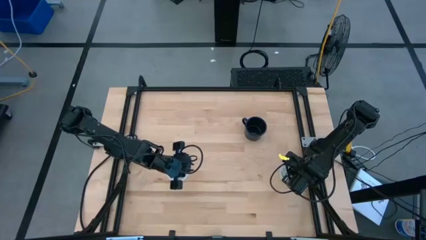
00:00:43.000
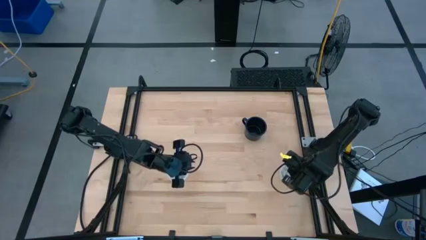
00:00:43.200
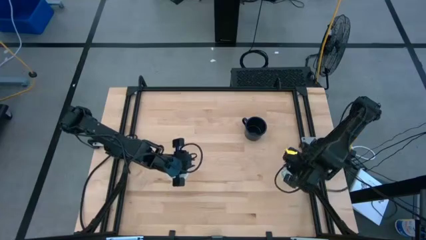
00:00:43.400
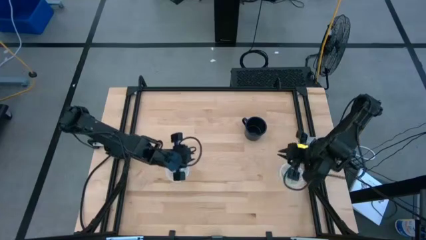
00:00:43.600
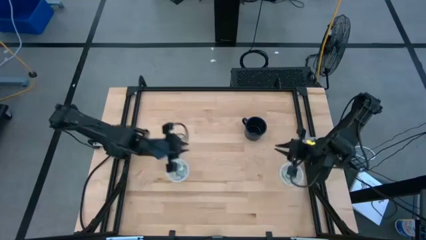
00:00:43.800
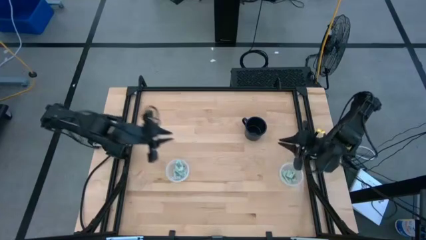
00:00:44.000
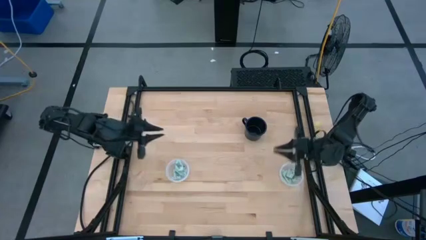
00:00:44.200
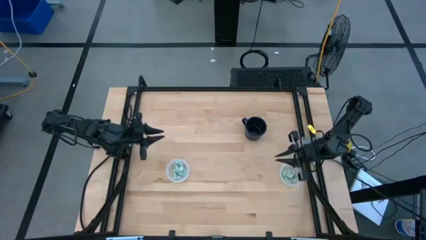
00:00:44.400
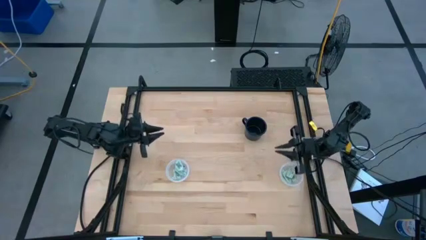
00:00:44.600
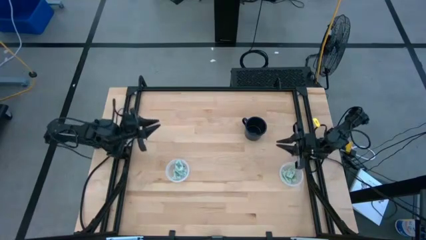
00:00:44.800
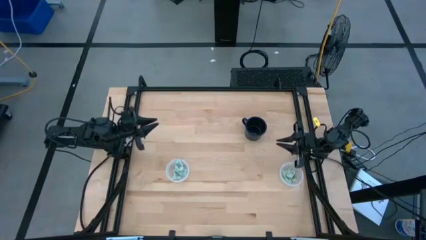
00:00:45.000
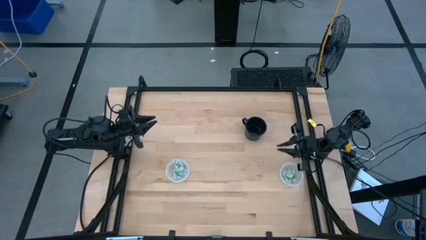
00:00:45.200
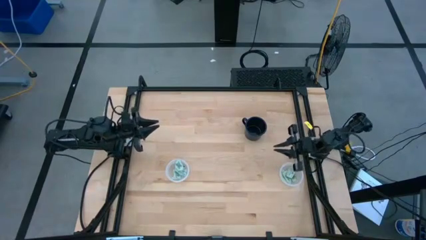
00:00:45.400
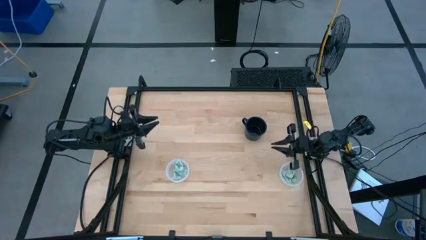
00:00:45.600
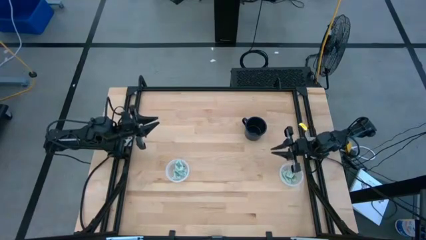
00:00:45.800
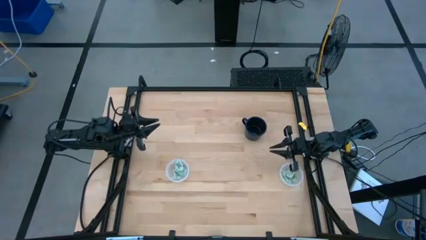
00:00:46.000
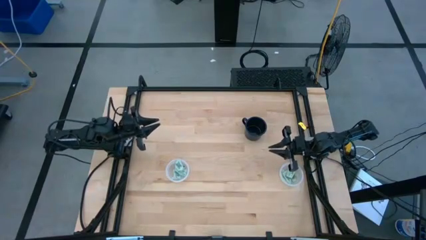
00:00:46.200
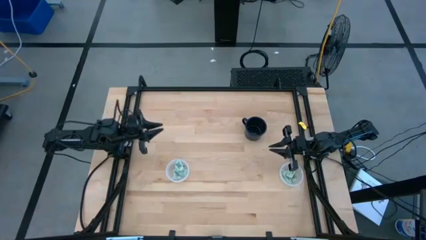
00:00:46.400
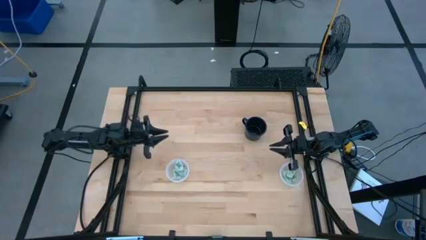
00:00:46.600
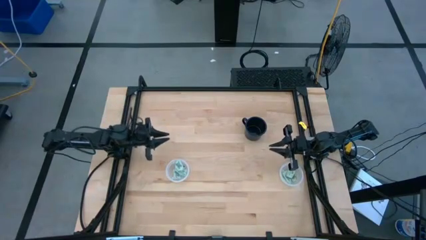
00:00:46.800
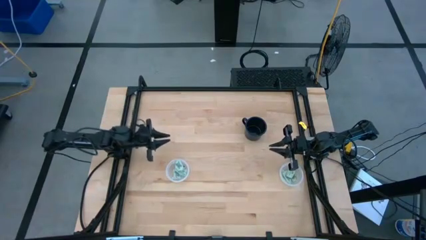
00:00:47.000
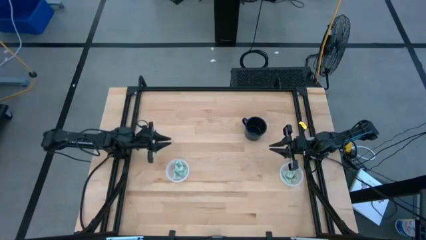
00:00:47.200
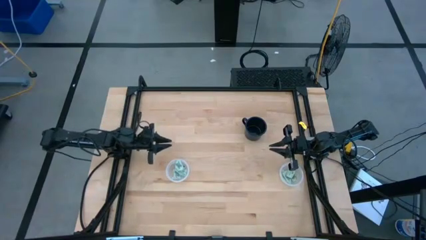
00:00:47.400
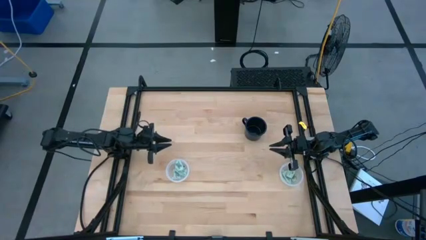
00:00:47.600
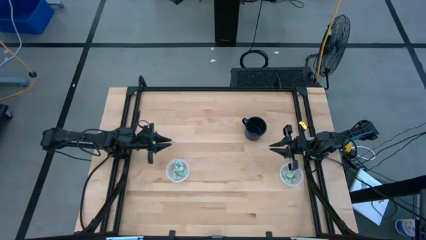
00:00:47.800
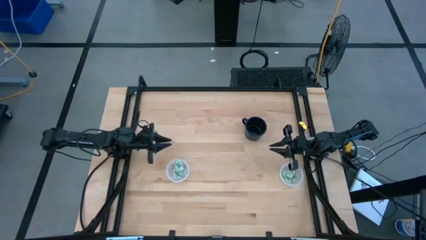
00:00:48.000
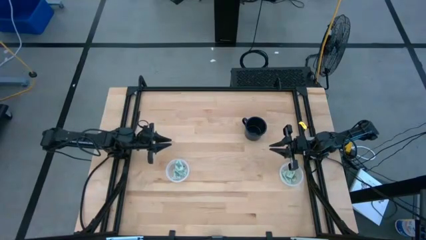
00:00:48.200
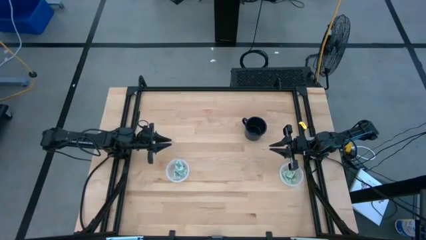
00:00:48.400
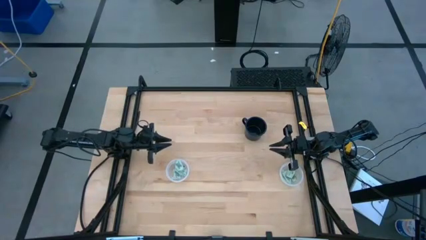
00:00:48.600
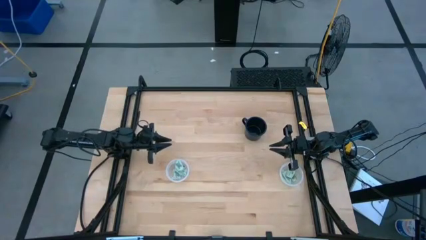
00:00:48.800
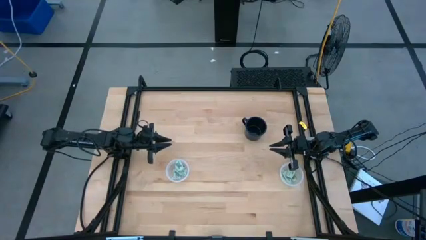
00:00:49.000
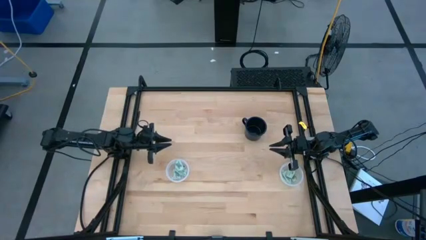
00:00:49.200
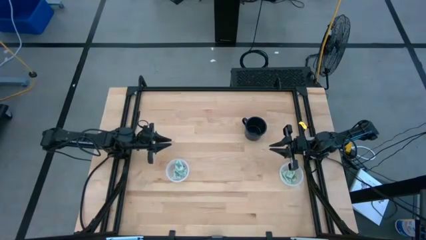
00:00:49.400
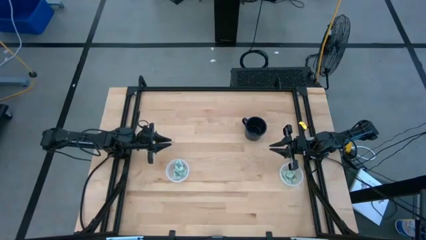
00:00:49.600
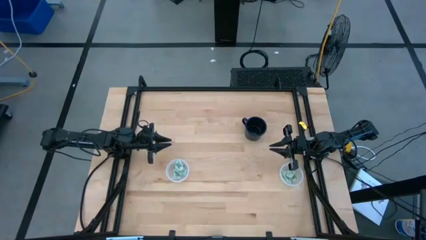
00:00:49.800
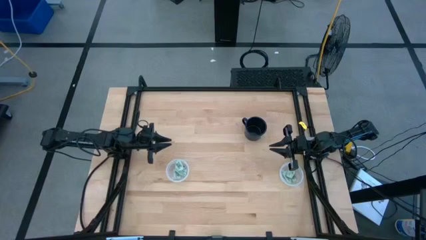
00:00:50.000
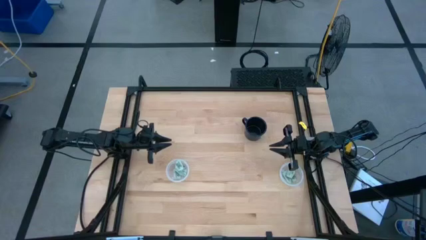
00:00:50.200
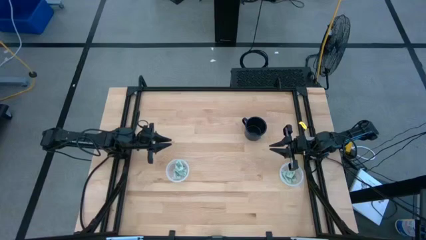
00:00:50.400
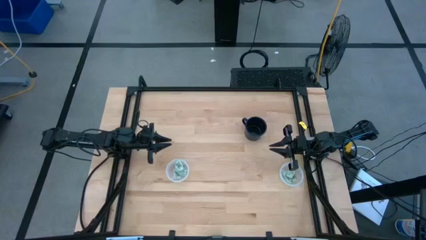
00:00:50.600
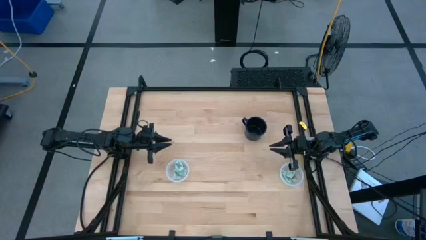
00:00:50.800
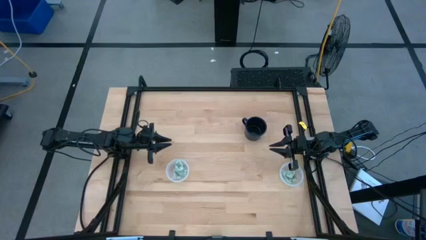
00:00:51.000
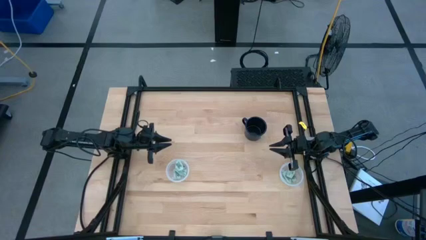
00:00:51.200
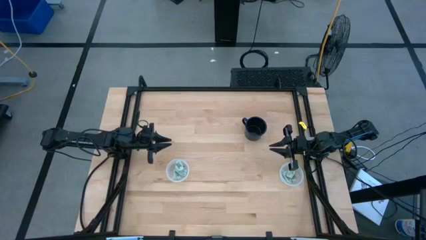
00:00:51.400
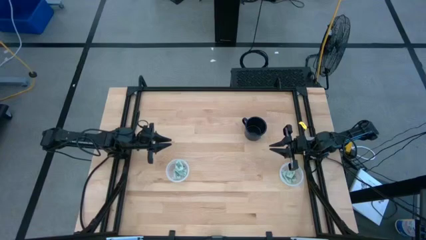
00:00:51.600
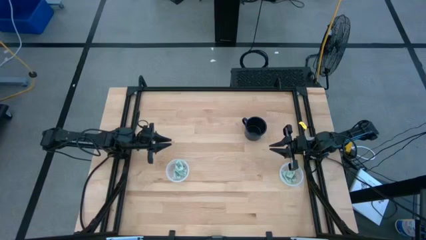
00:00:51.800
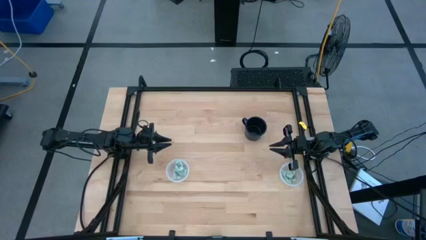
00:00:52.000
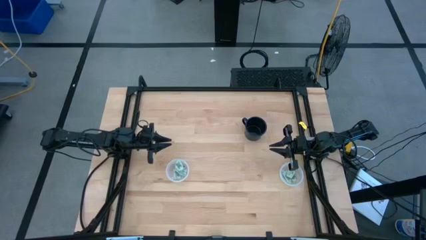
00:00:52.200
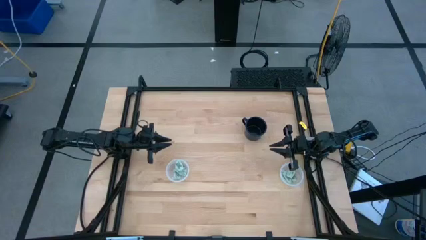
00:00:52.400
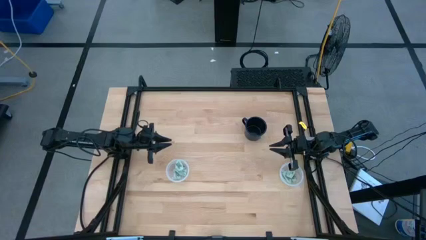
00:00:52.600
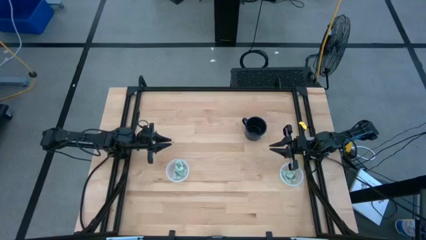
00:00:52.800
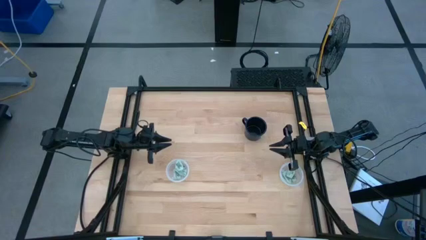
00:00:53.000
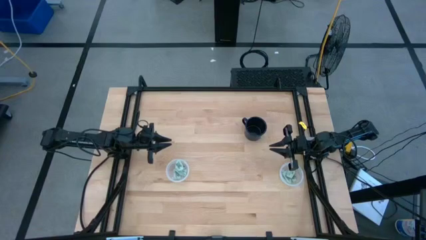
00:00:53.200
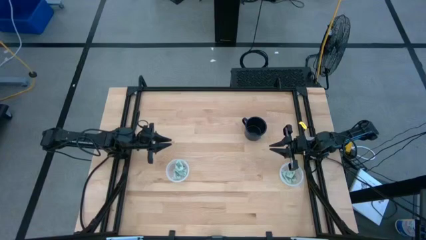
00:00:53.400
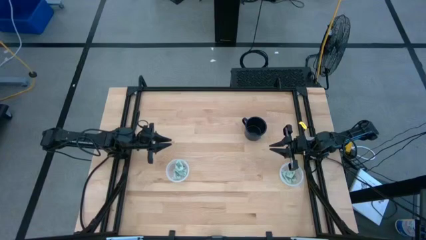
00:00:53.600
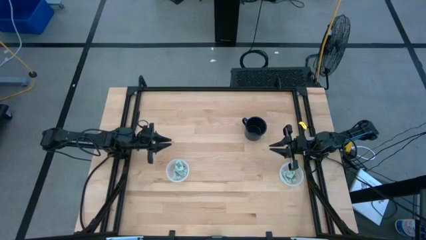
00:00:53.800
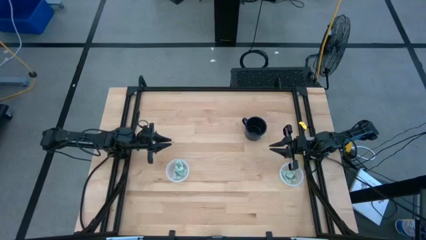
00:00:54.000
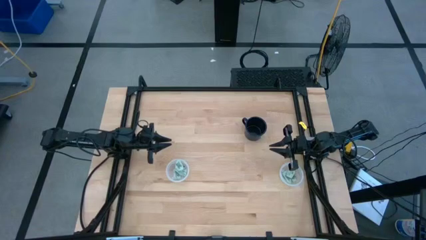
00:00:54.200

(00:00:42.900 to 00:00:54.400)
Task: Pick and place Stevia / Truvia into bins
Return to Home Position

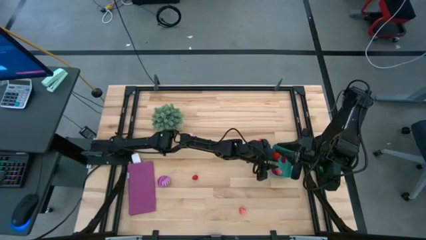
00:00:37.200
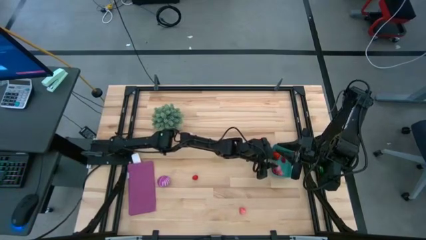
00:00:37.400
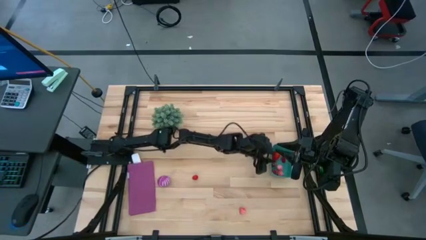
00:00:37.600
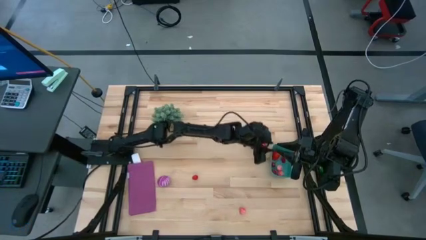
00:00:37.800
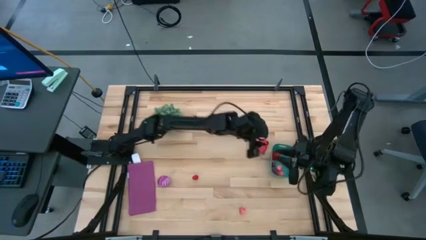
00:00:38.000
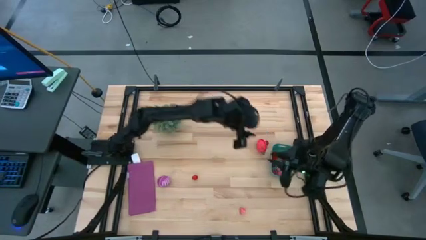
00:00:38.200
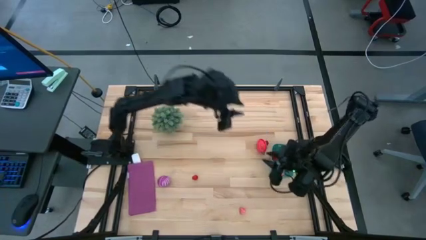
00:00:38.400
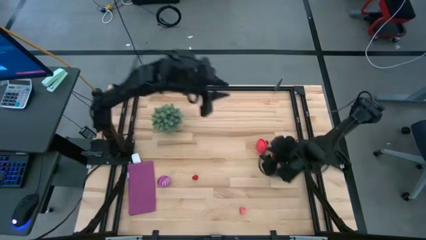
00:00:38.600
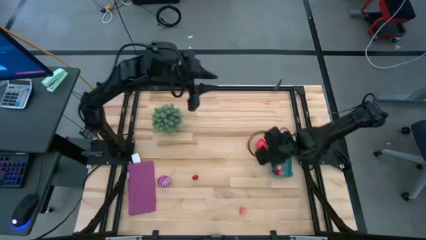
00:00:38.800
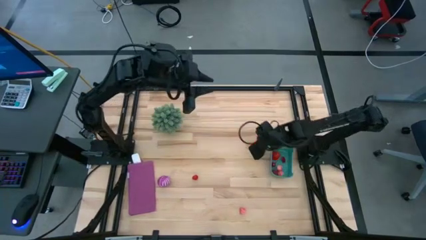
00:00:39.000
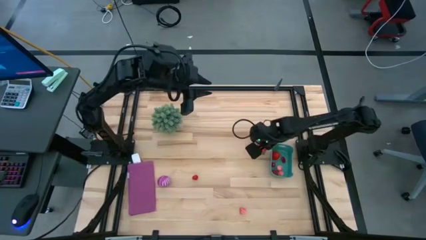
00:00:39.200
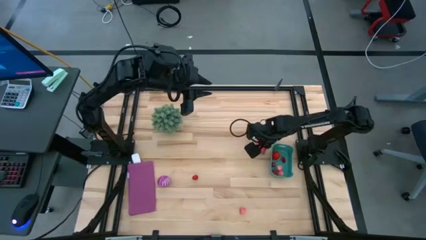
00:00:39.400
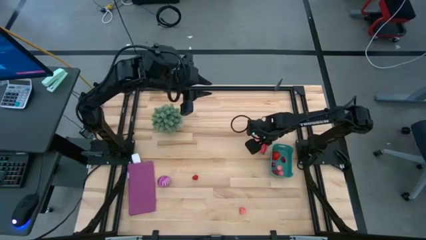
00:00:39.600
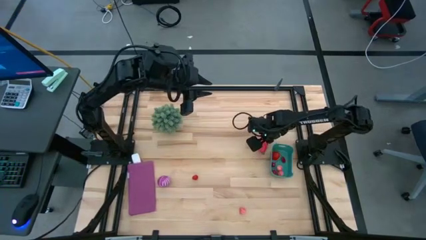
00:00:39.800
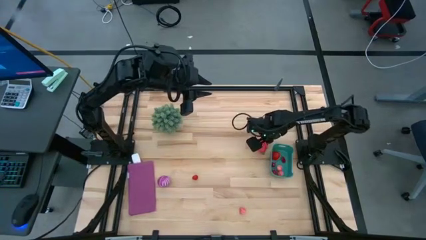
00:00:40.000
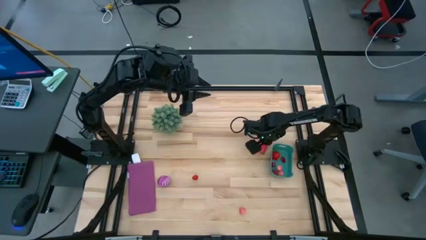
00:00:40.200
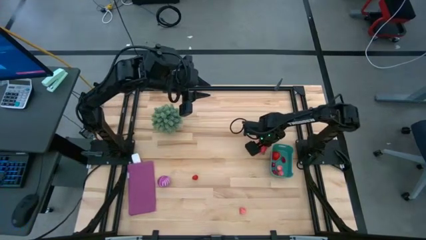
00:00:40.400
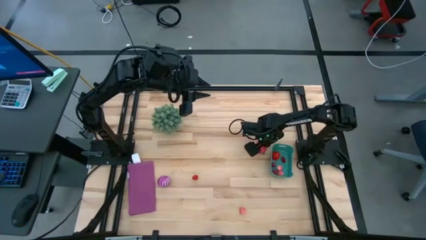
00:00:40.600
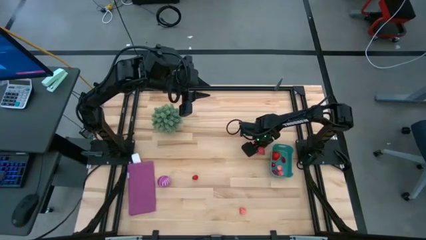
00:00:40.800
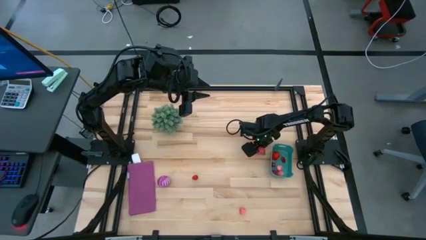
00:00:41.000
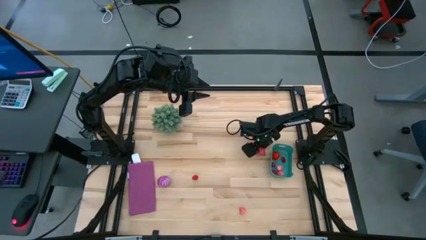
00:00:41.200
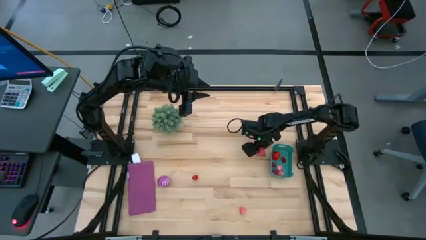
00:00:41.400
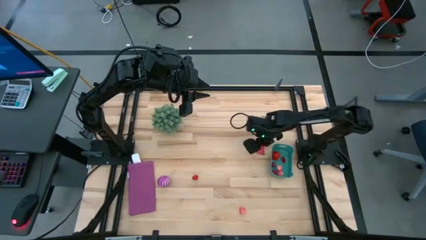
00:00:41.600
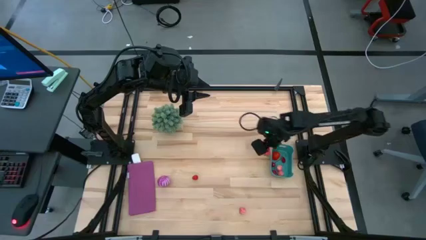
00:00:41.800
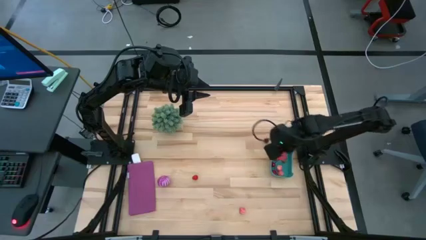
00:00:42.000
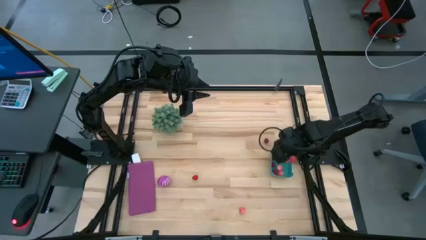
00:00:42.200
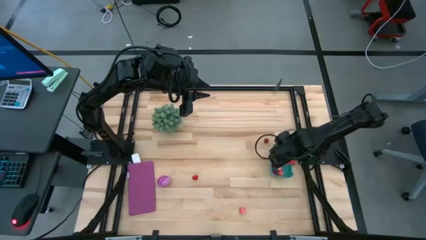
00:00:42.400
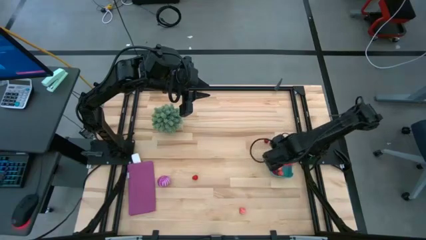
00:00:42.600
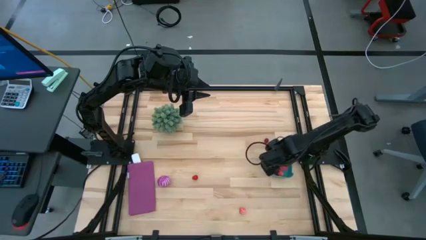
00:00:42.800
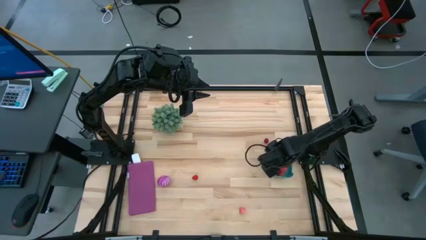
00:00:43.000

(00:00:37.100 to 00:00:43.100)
Task: Pick and placing Produce into tupperware
Put the red dragon fruit into the green bin
